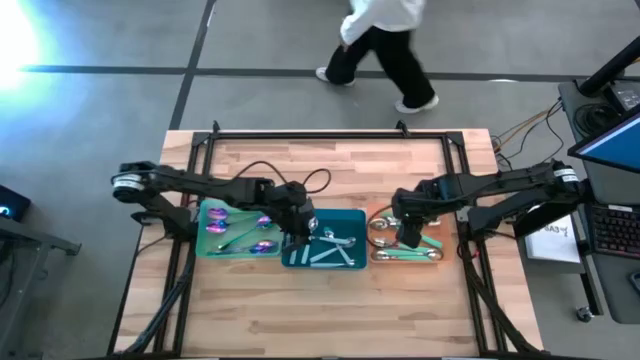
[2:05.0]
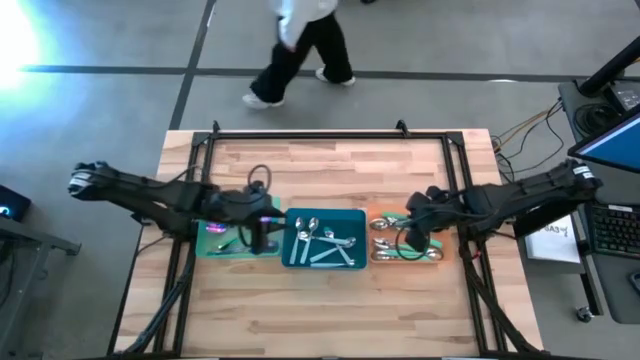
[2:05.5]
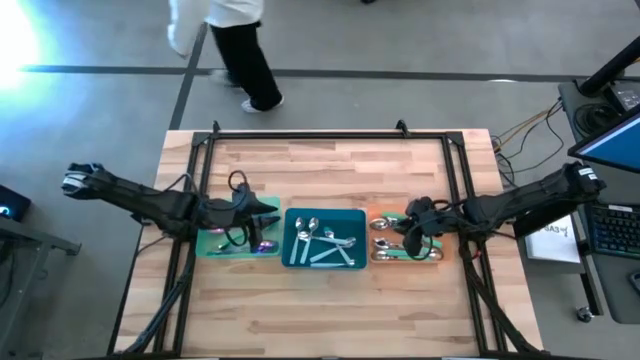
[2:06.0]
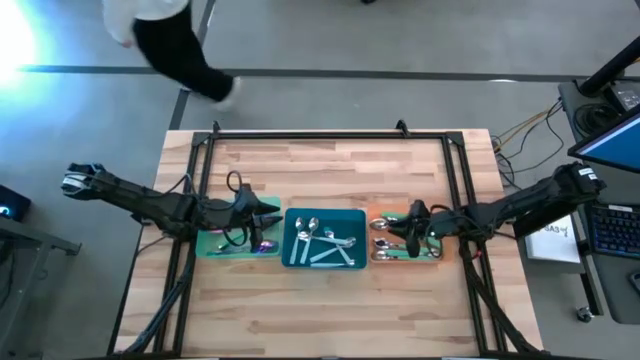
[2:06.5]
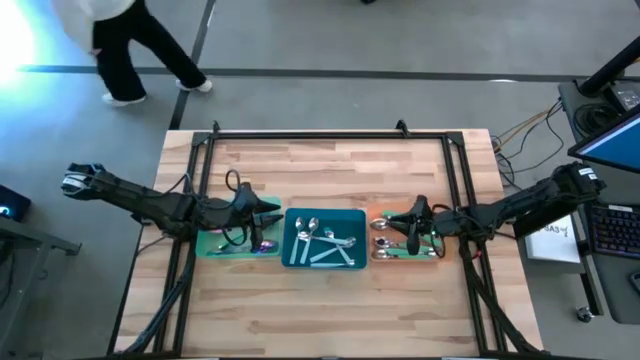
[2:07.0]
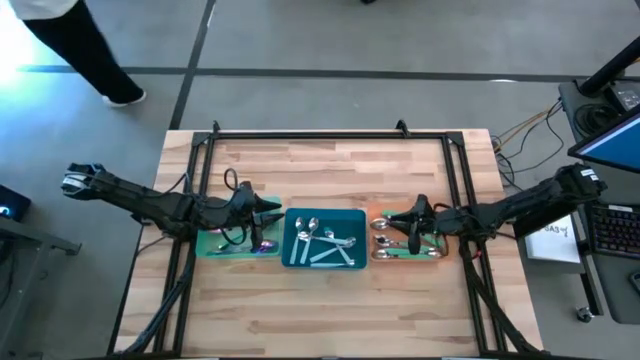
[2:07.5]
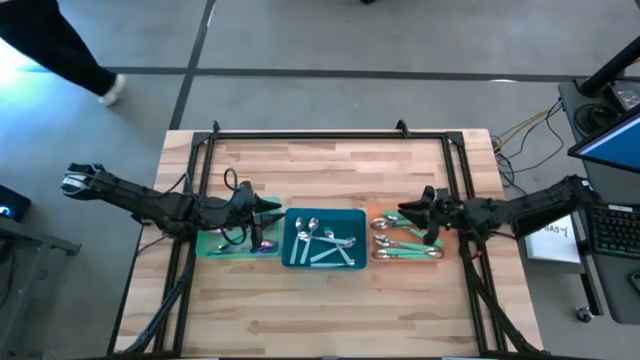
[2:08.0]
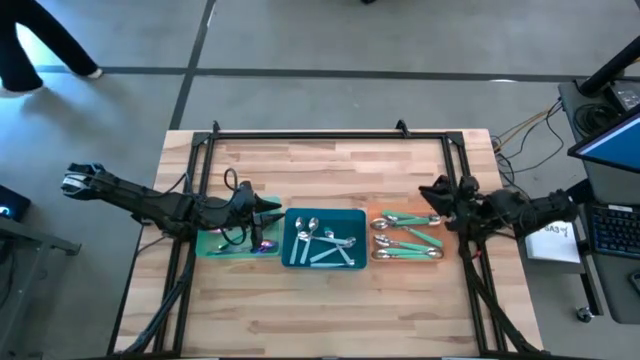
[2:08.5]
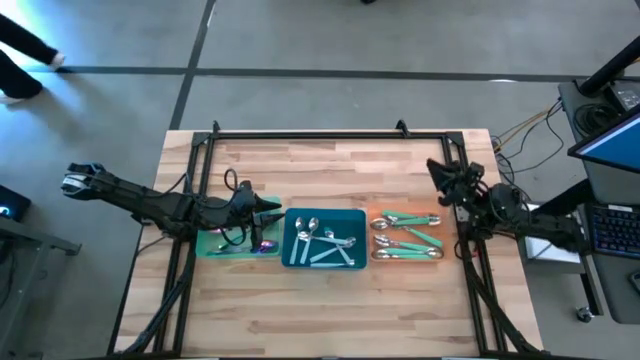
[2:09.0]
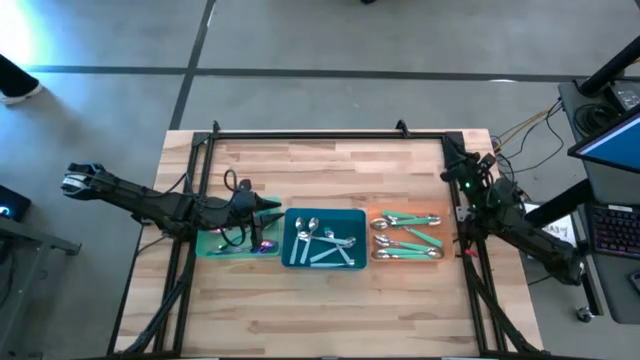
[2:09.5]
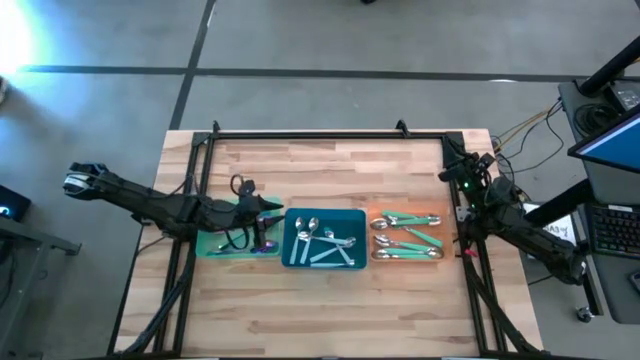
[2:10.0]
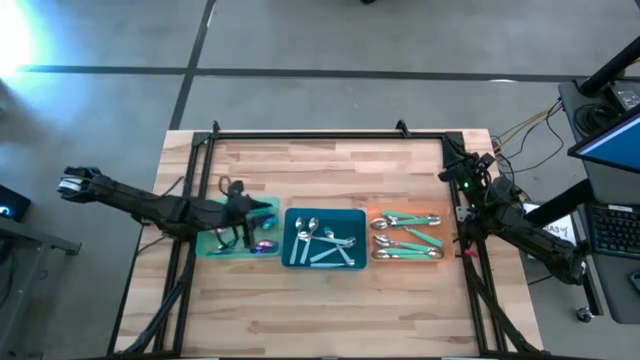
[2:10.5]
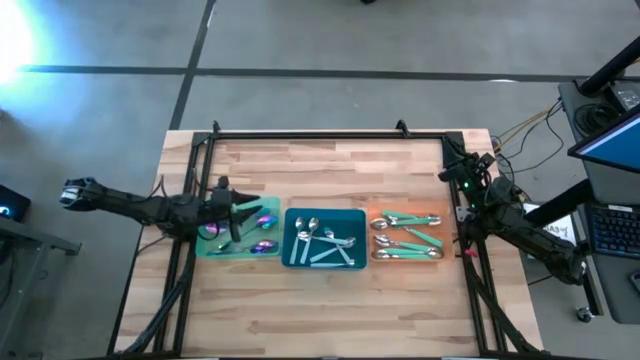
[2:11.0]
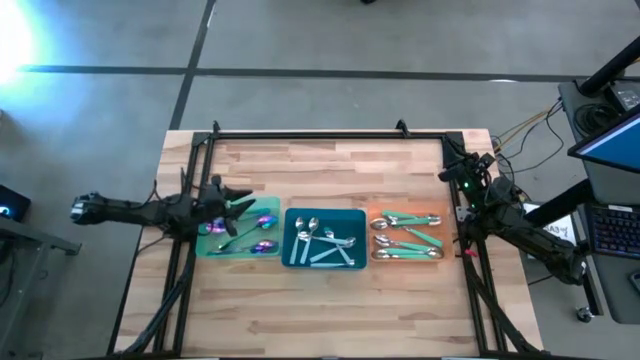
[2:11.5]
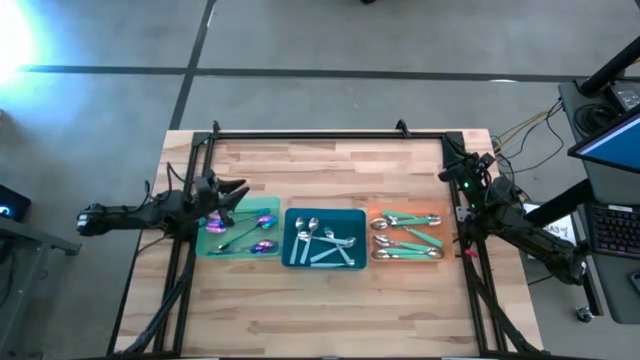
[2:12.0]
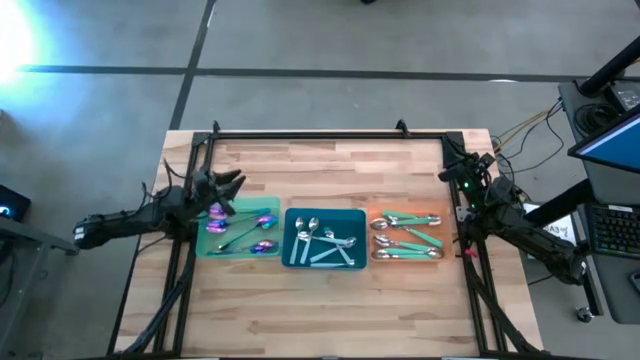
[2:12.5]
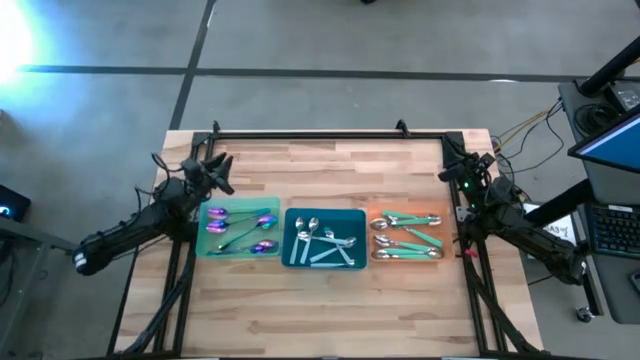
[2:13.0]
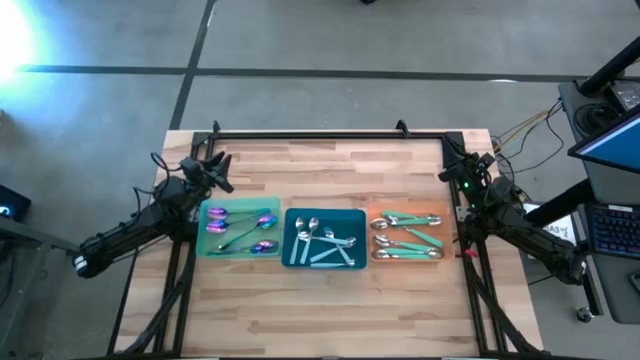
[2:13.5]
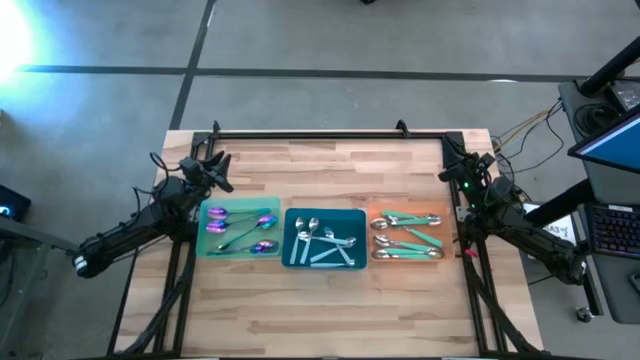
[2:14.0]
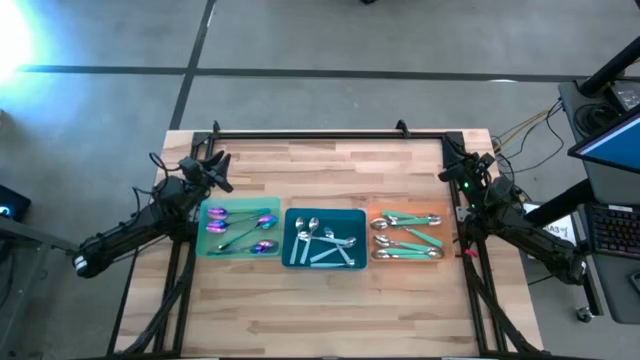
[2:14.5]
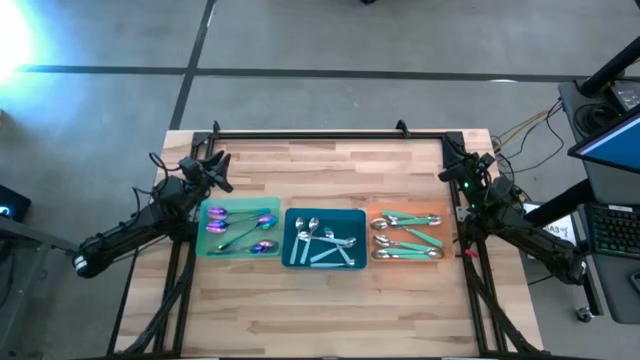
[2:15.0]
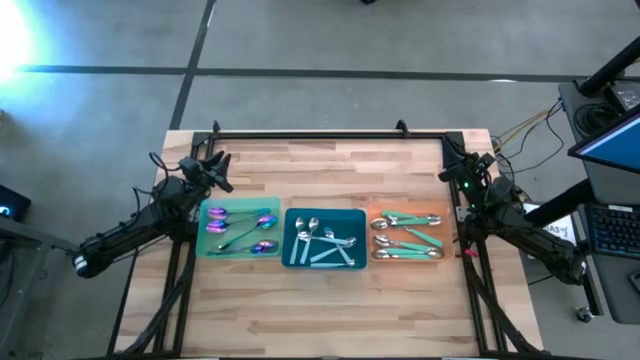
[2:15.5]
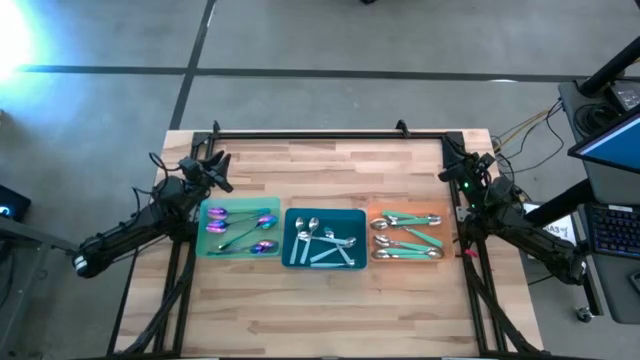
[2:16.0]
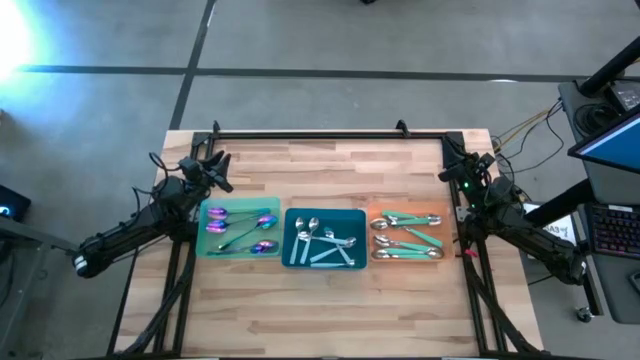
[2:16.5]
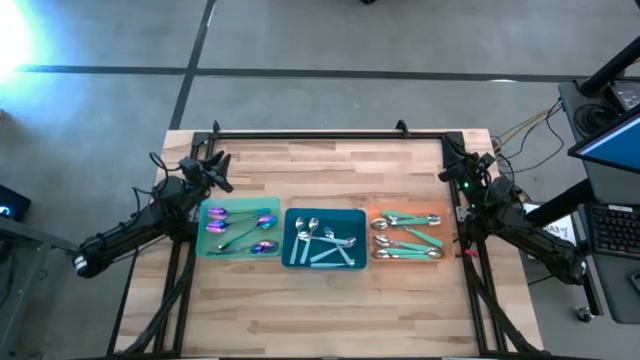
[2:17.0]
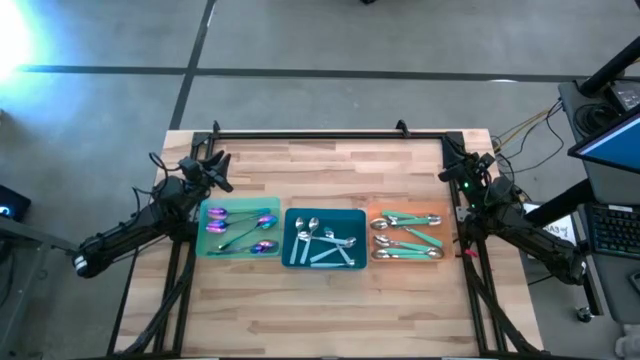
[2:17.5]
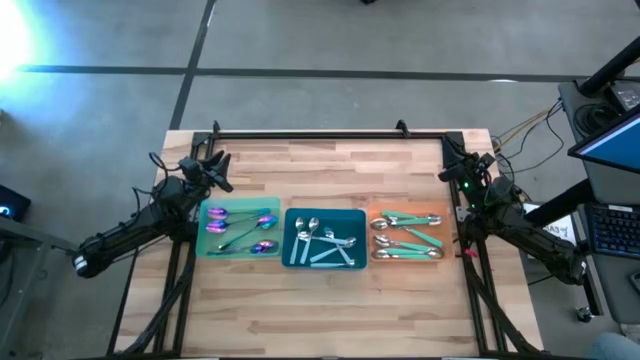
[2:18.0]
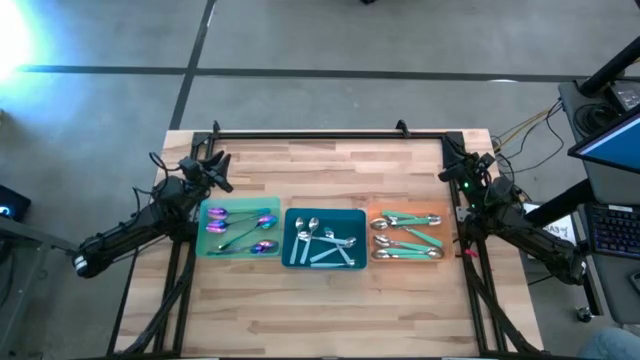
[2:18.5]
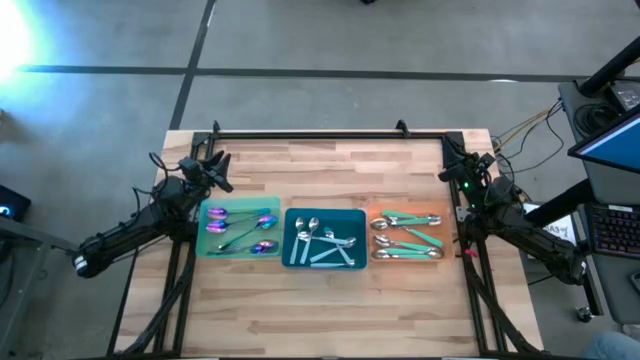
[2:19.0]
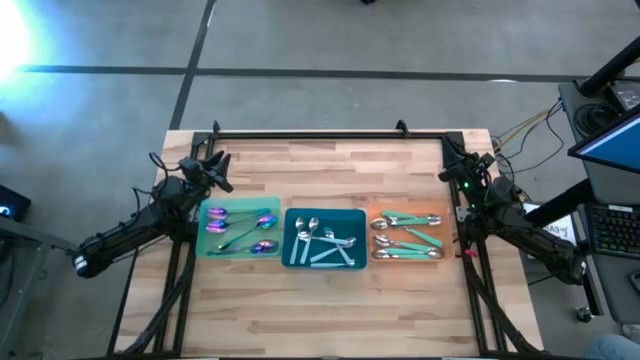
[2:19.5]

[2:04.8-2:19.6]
Task: Sort silverware by color (type)
Return to Home Position

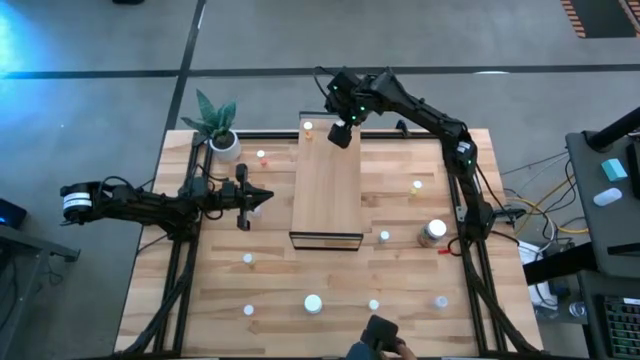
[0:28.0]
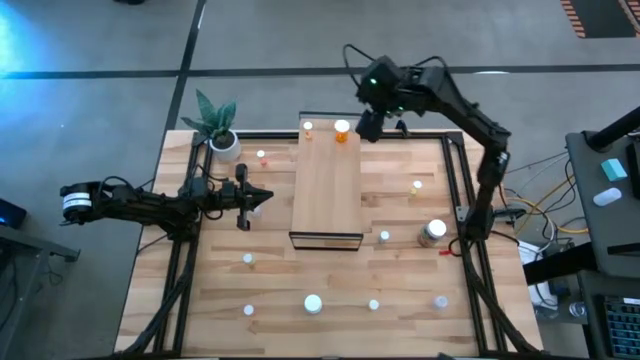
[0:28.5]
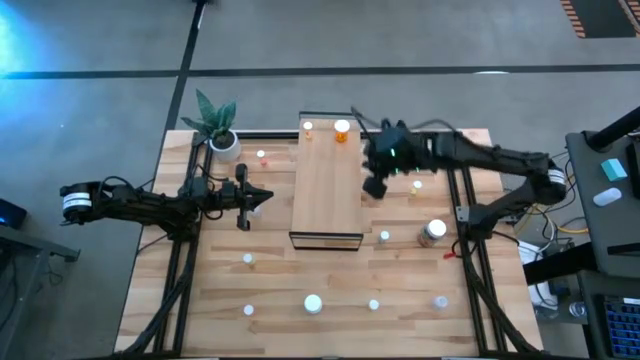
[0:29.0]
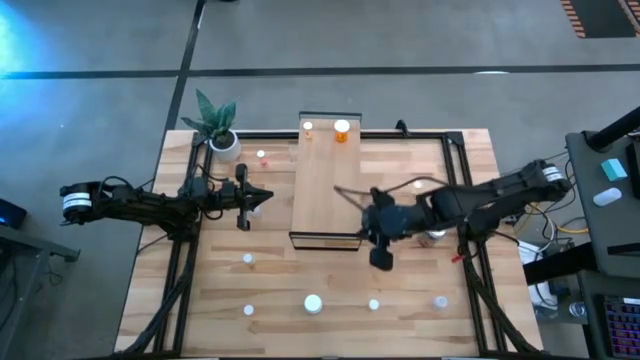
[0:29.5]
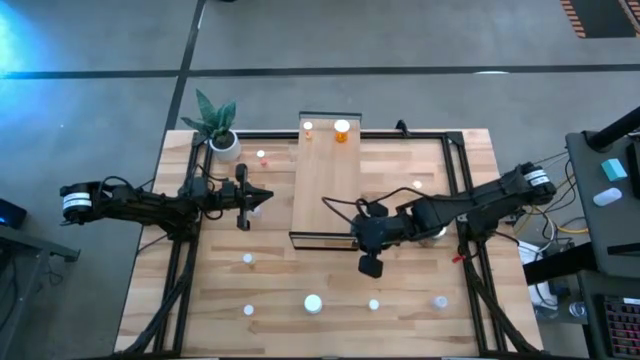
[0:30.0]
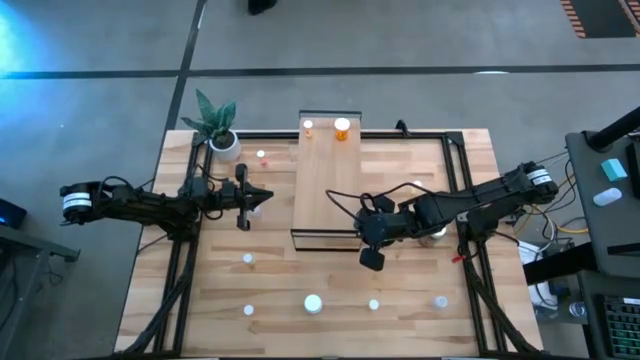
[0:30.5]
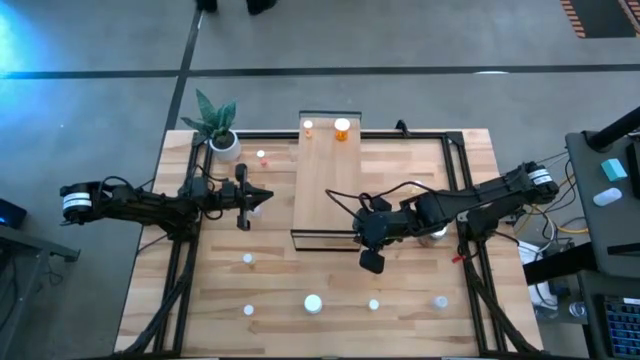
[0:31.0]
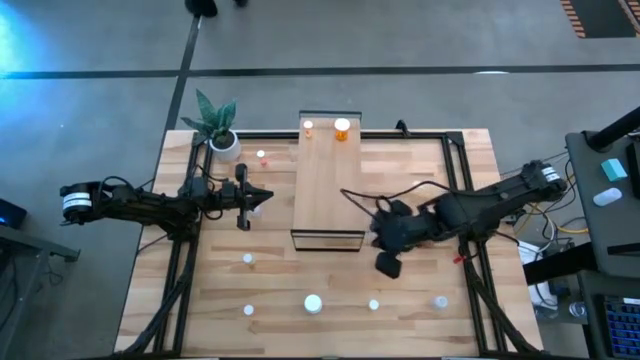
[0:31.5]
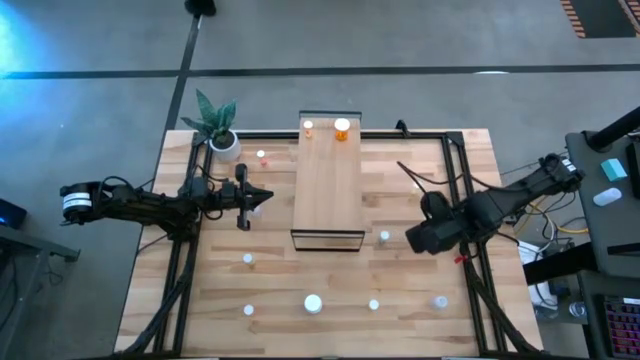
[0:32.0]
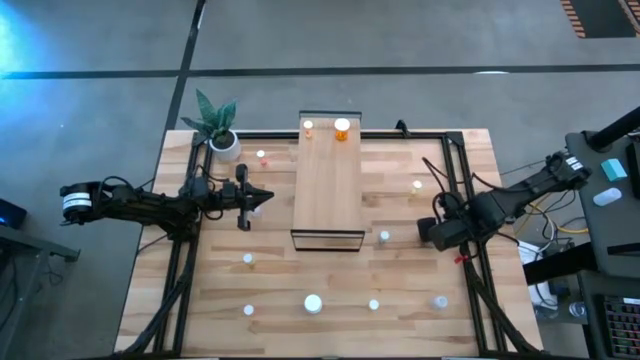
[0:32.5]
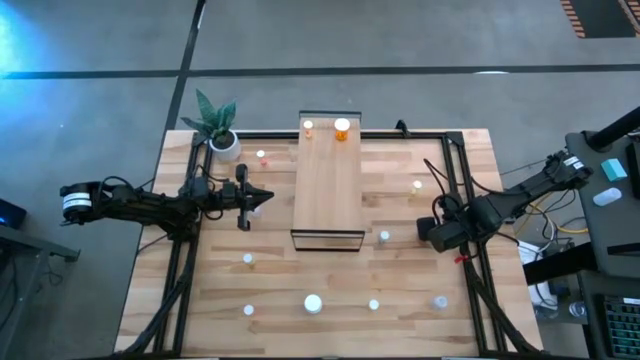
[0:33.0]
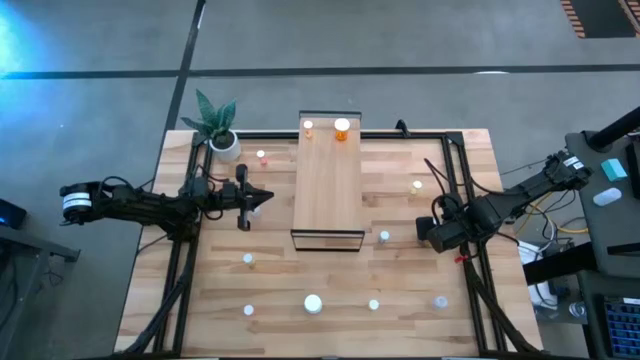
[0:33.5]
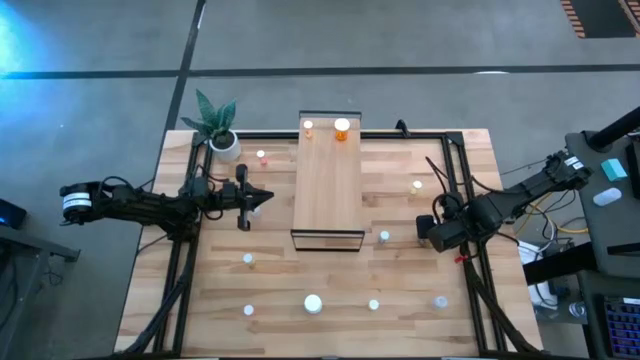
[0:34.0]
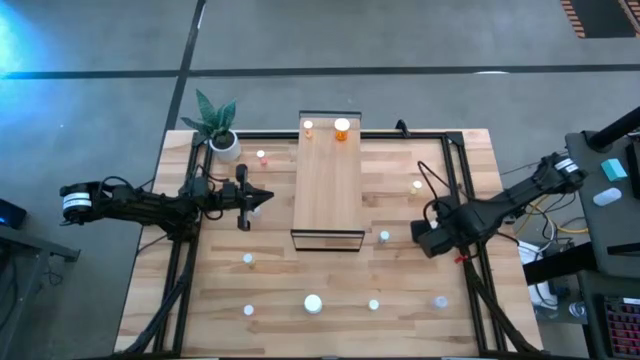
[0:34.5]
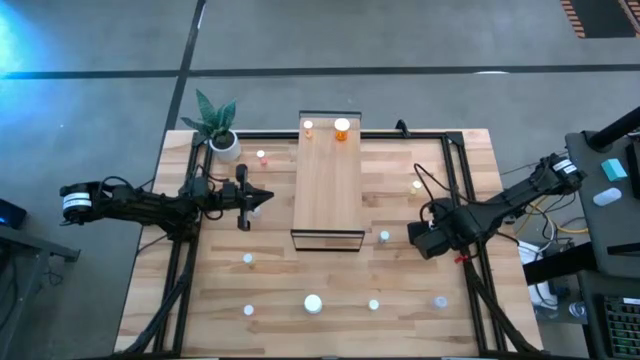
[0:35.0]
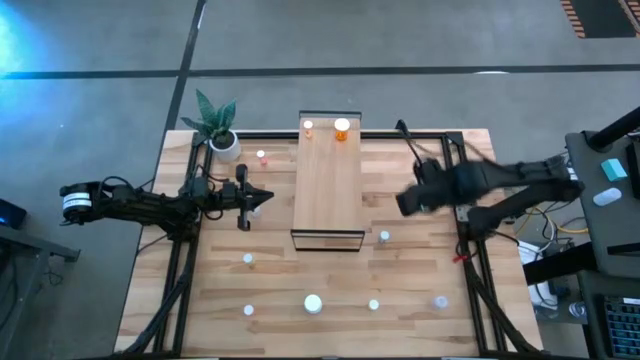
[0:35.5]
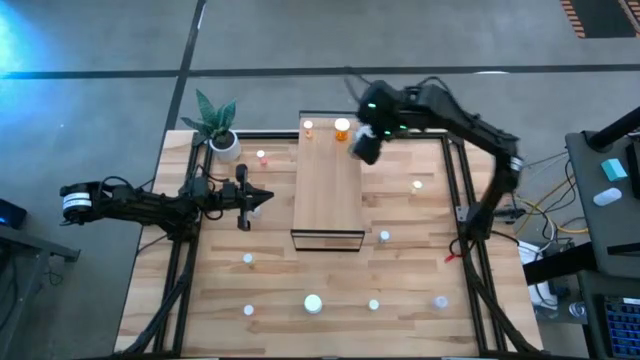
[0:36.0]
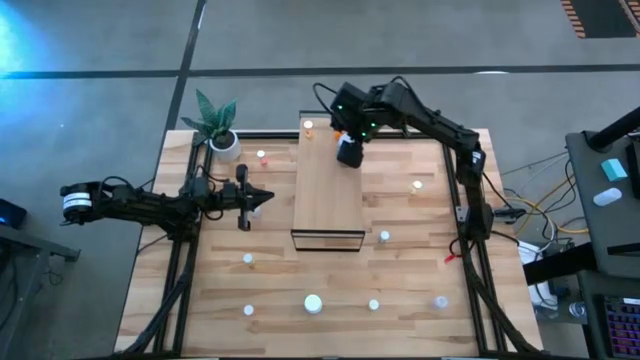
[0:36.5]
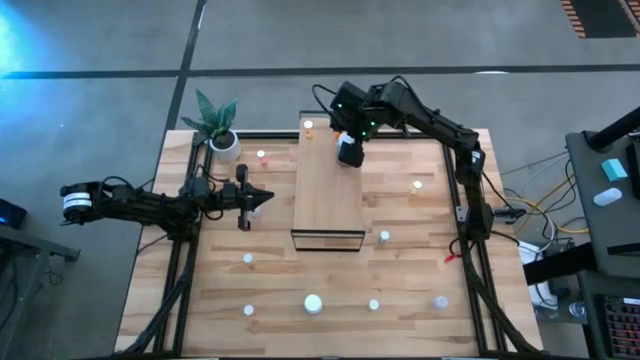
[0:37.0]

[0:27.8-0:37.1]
Task: Pick and place medicine bottles onto shelf by color
Put the green medicine bottle on the shelf
